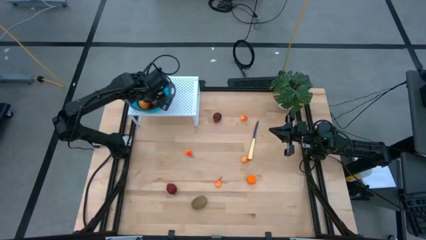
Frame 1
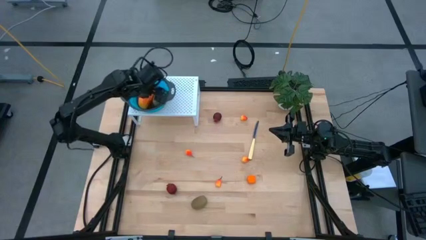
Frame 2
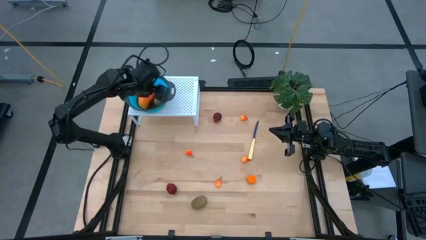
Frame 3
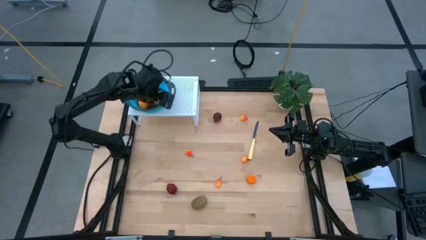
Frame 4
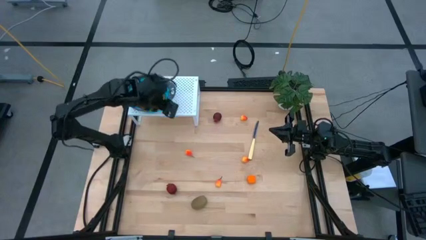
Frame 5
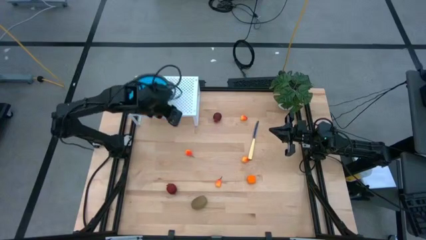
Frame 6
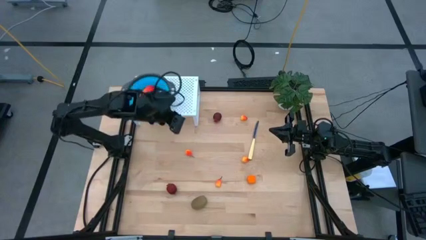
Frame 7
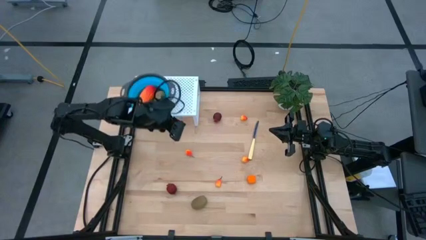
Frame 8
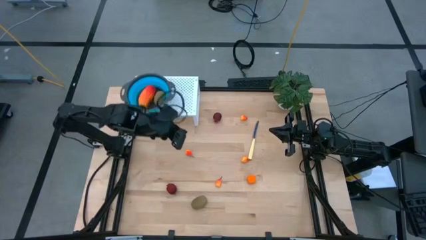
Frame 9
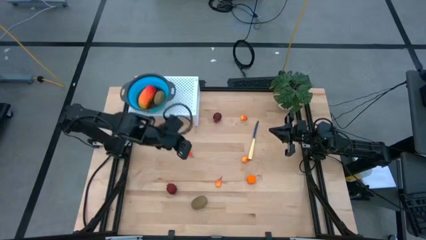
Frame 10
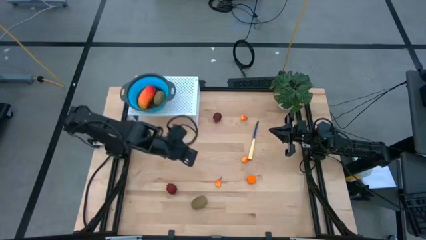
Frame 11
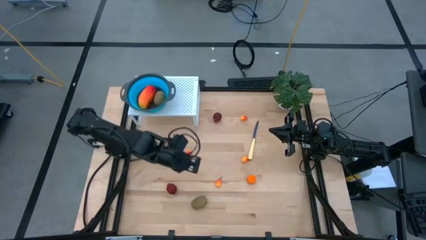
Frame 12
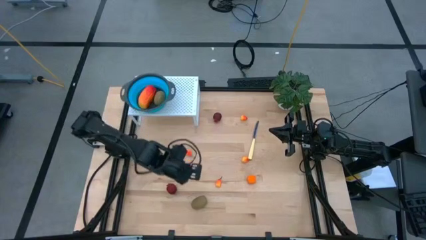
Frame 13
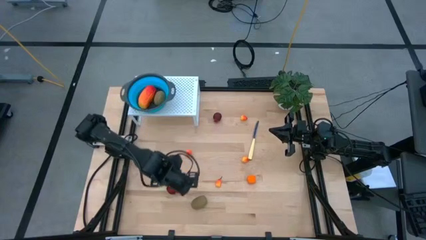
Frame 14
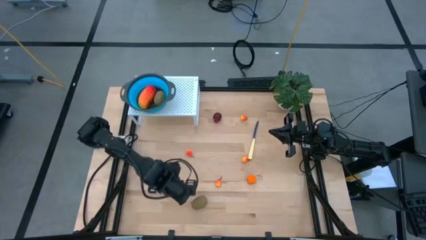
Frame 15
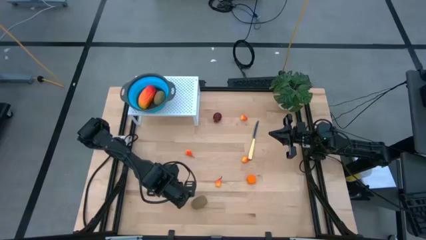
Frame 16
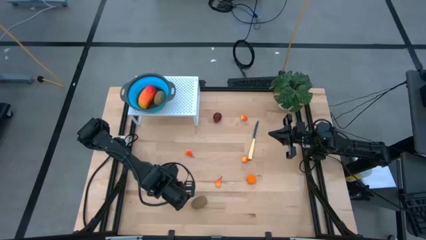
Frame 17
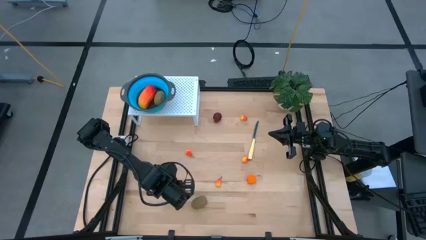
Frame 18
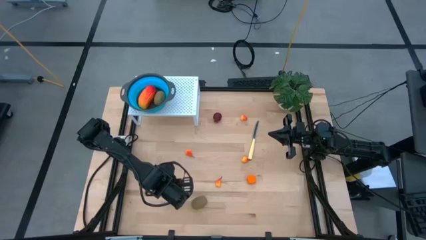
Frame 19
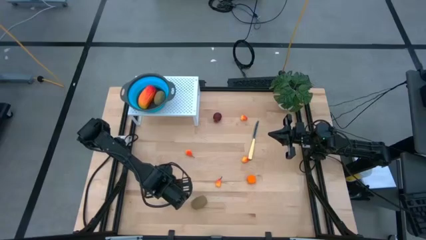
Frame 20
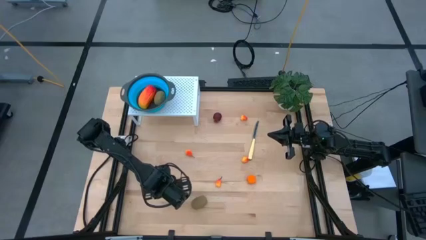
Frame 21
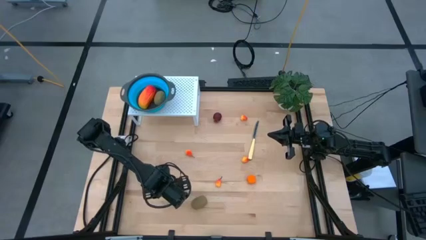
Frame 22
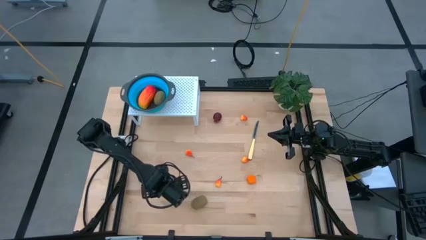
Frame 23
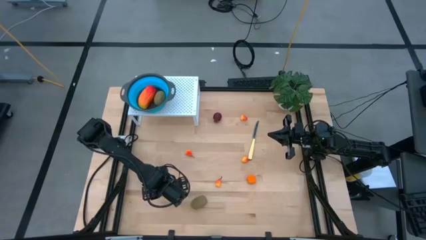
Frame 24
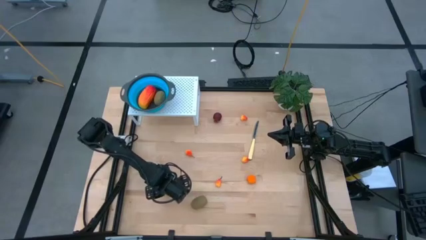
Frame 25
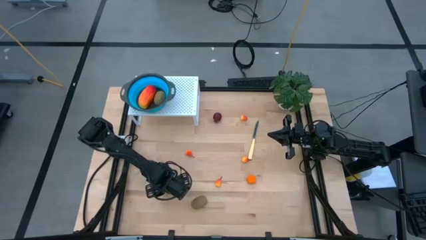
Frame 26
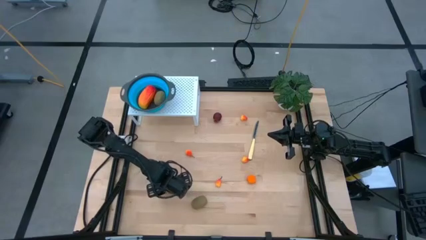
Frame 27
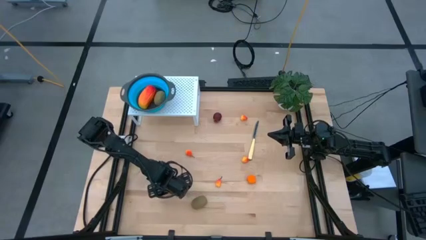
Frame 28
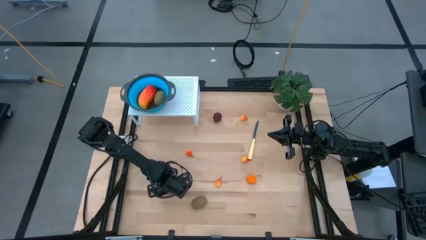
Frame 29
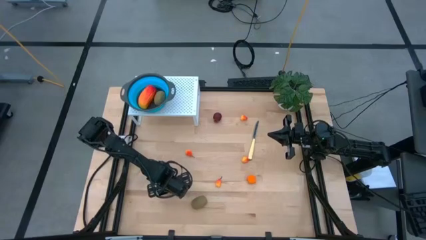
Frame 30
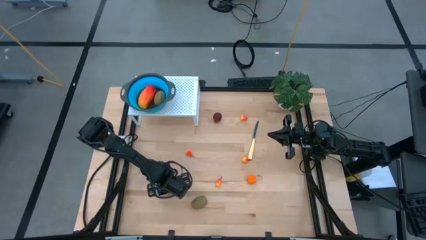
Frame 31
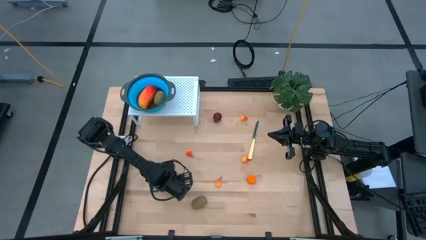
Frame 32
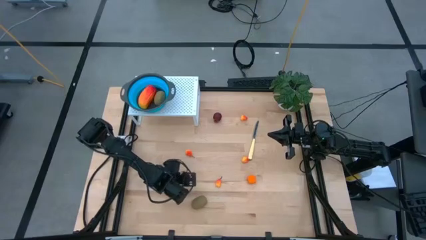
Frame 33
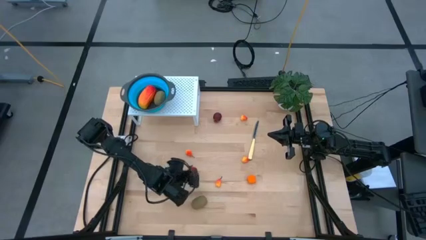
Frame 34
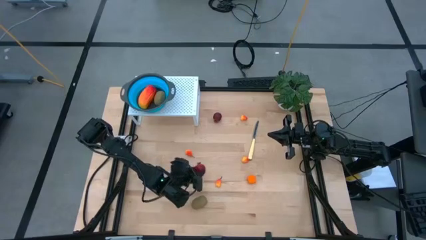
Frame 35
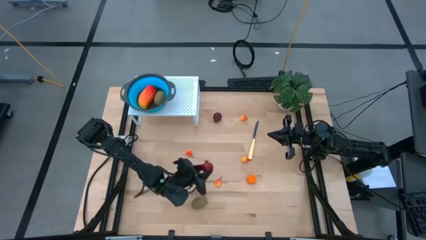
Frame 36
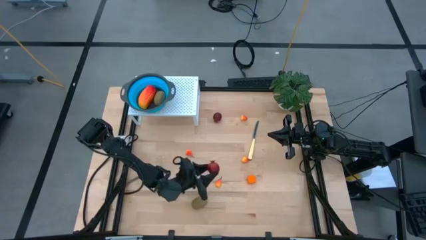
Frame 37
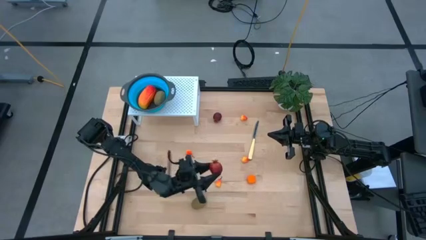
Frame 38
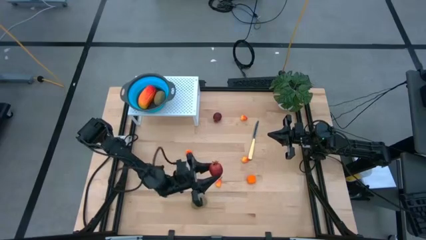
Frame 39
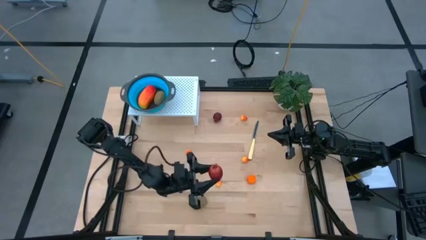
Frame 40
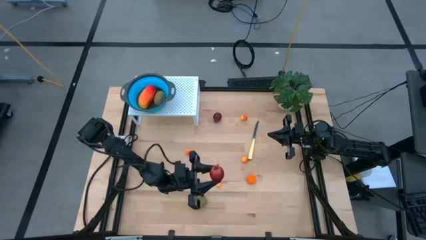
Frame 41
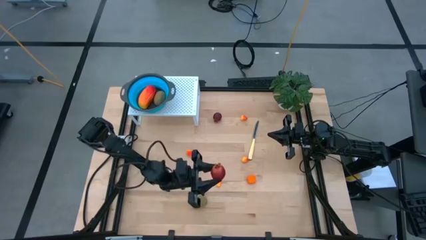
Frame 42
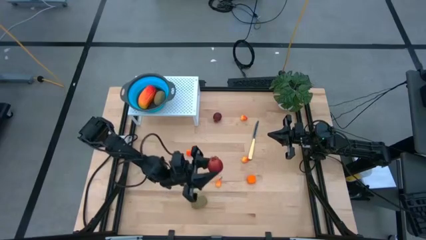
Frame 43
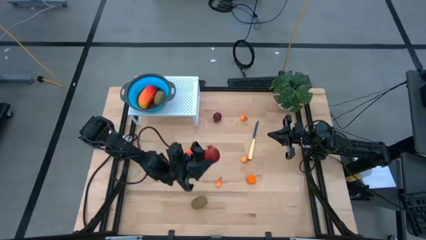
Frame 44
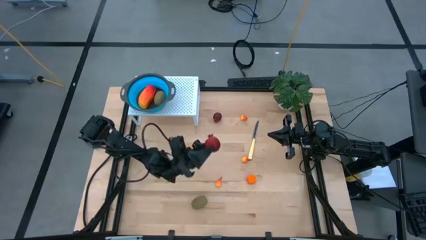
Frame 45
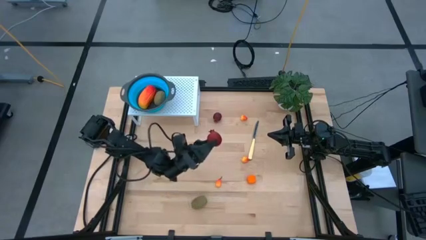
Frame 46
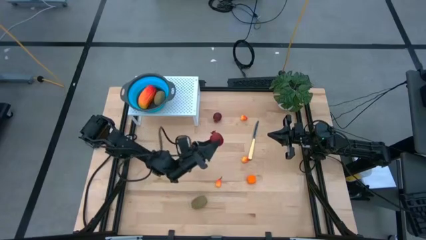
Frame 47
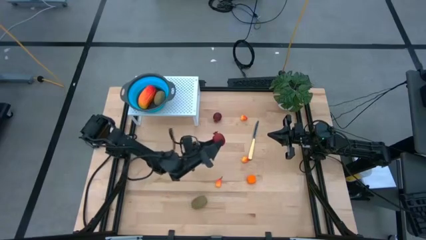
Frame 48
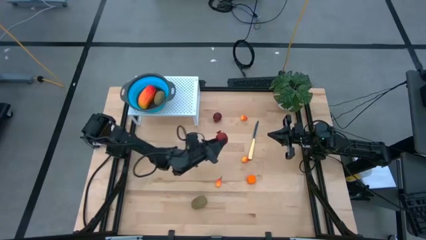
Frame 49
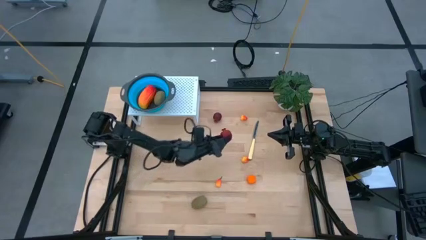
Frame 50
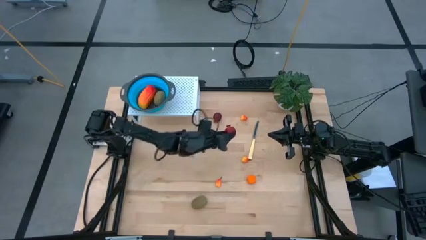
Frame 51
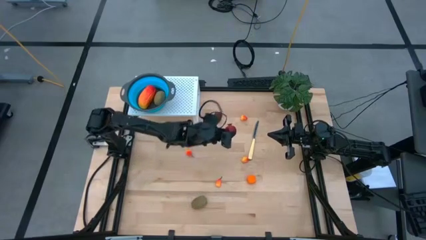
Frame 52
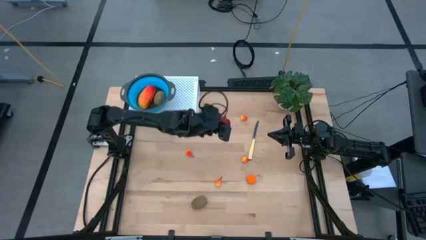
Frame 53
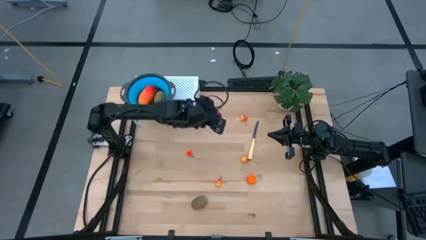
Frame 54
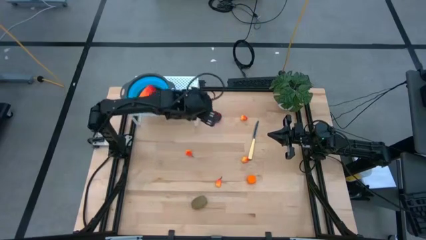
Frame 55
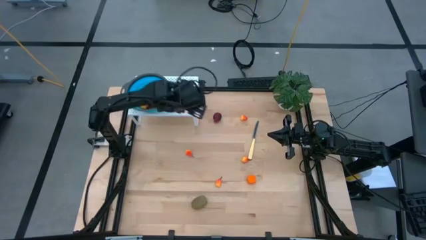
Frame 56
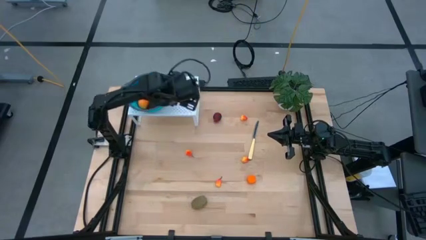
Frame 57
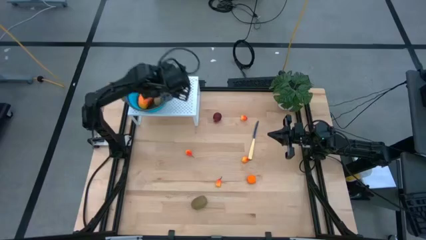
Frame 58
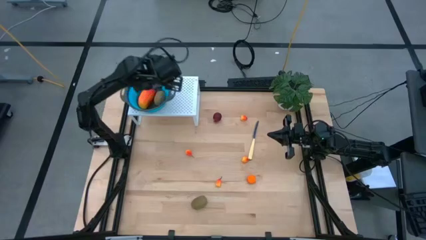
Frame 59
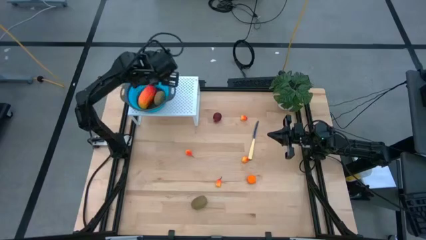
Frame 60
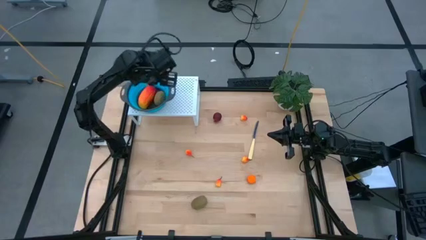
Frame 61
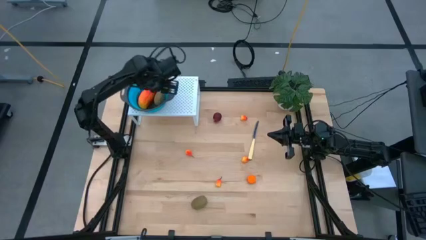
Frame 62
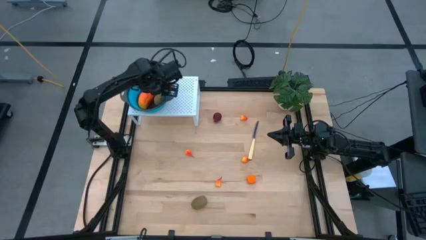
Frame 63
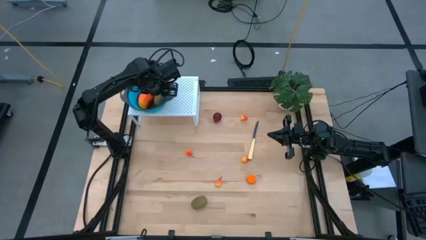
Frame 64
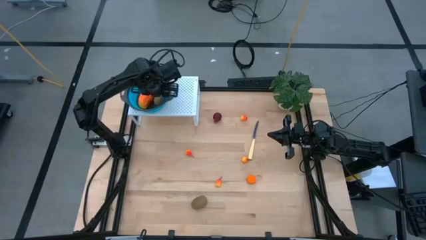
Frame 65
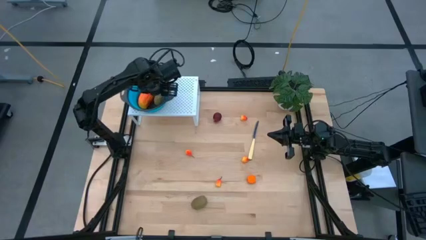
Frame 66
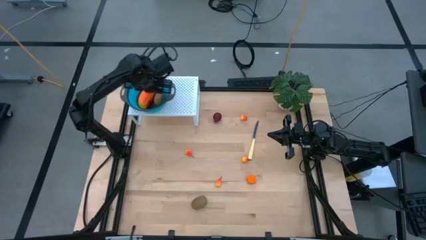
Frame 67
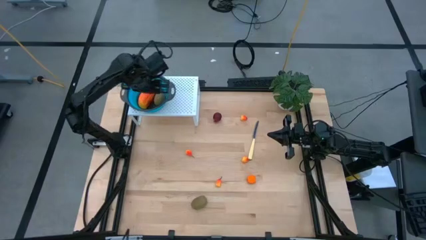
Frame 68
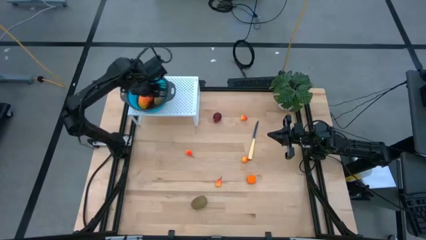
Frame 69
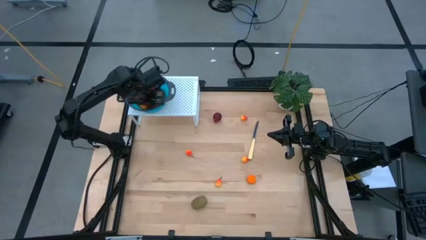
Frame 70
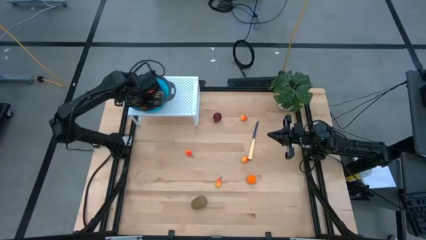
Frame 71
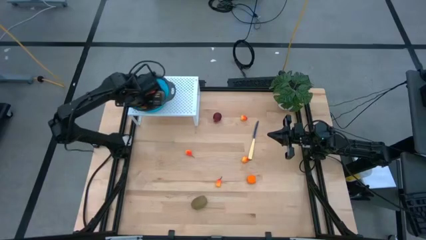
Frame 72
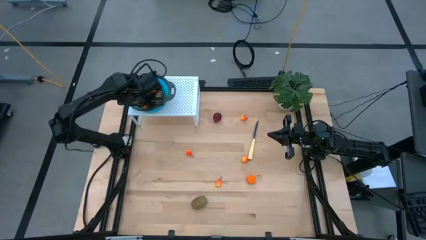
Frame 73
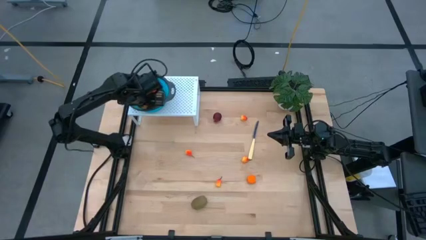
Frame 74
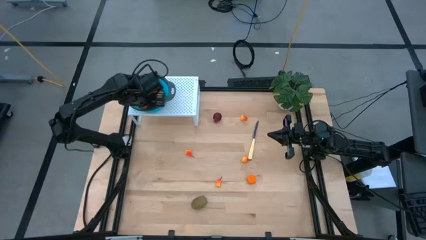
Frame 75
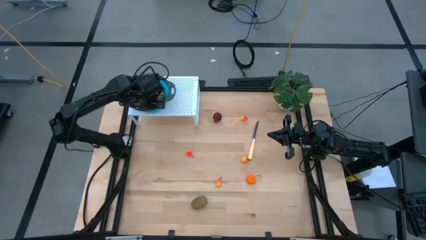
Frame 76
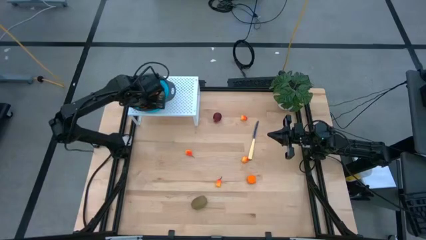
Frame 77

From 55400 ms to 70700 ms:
Task: Pick & Place Fruit
Put the red pomegranate into the blue strainer bowl on the shelf
